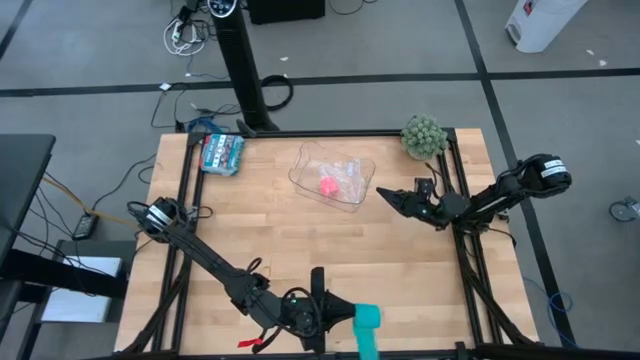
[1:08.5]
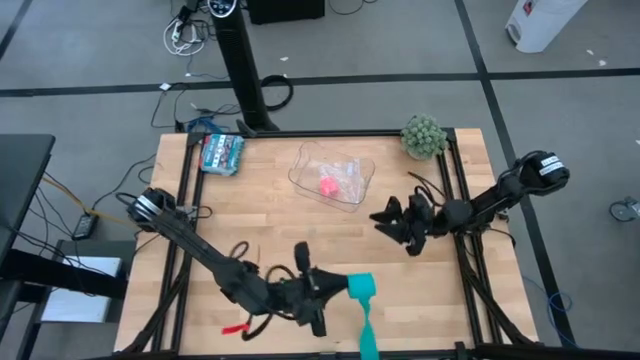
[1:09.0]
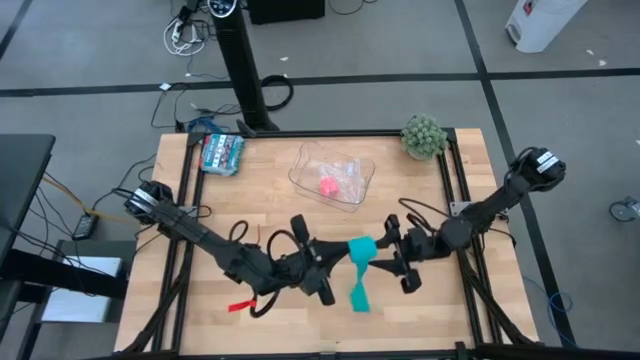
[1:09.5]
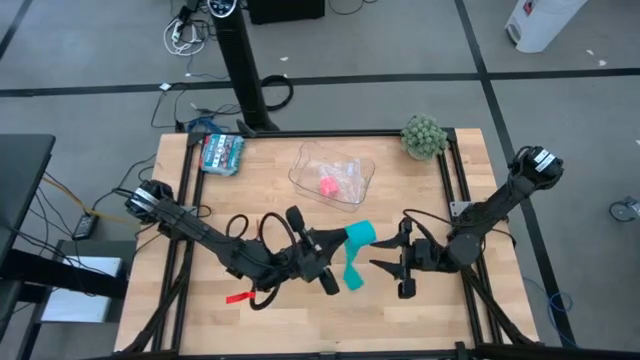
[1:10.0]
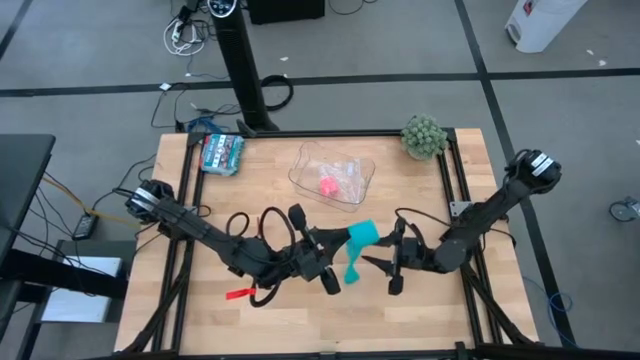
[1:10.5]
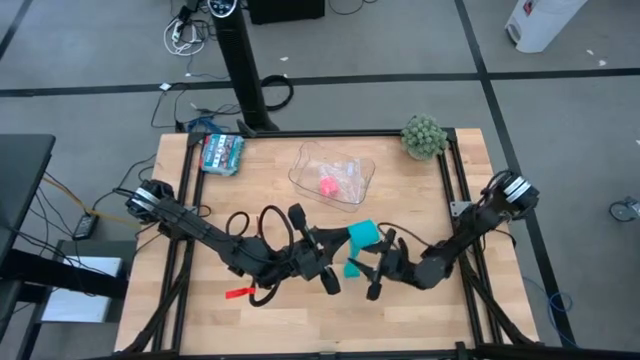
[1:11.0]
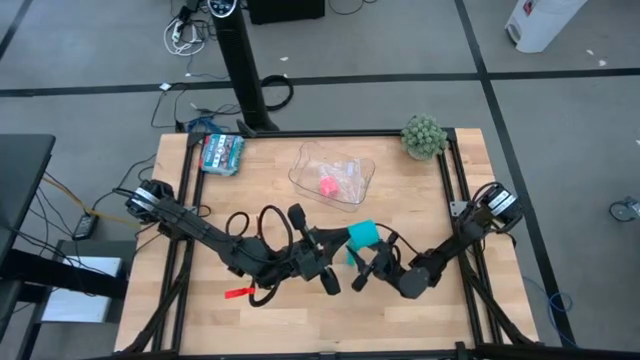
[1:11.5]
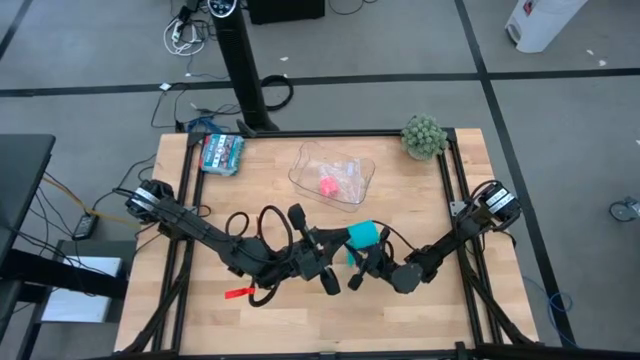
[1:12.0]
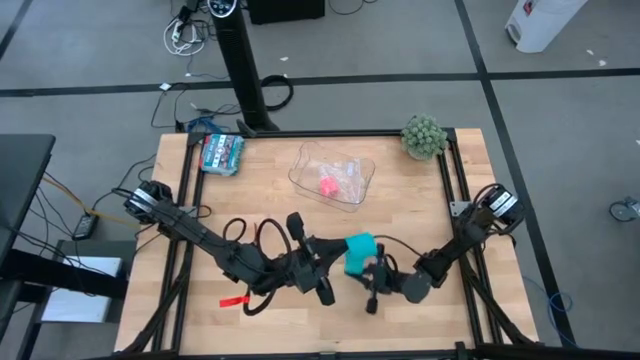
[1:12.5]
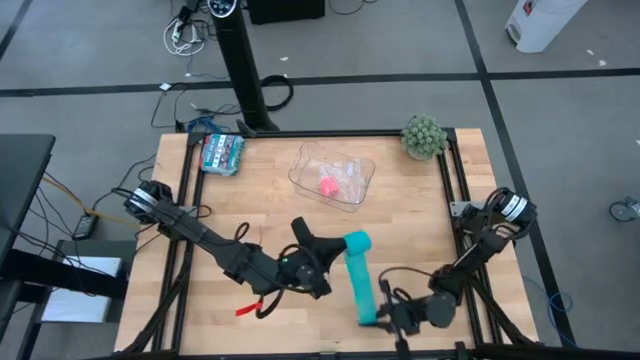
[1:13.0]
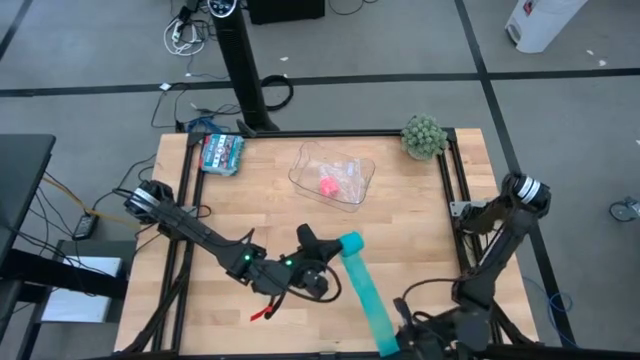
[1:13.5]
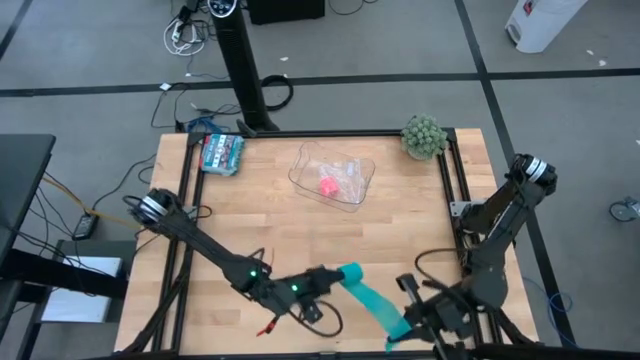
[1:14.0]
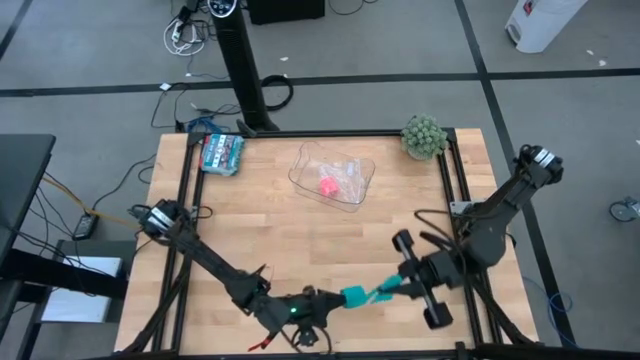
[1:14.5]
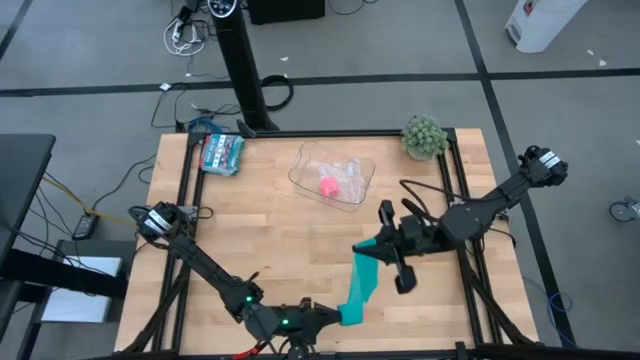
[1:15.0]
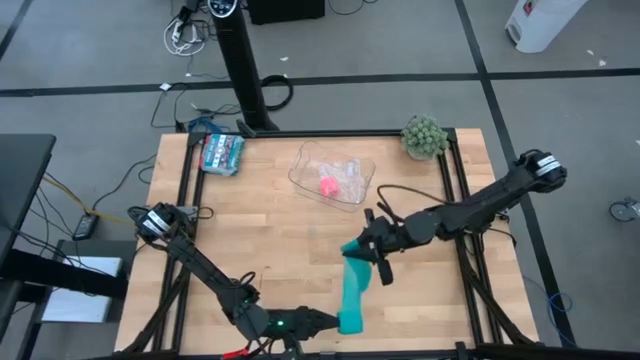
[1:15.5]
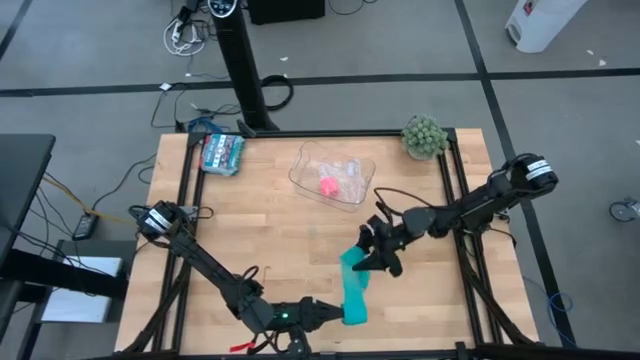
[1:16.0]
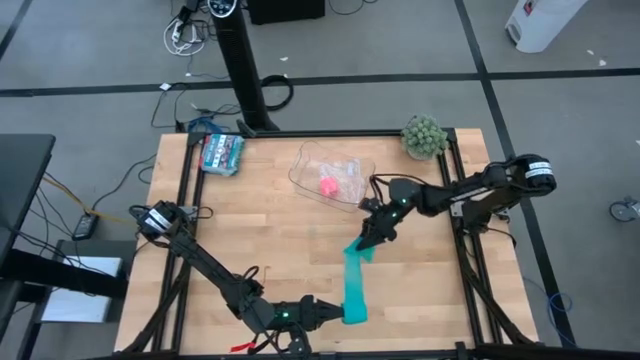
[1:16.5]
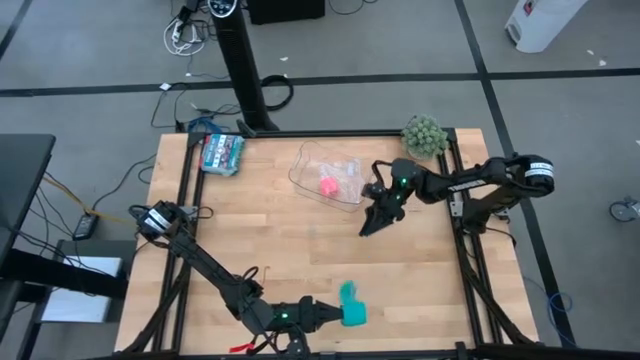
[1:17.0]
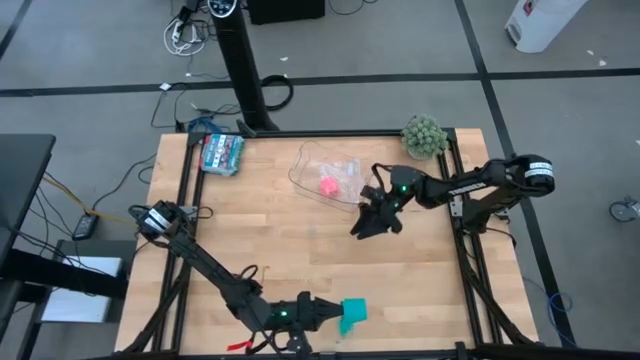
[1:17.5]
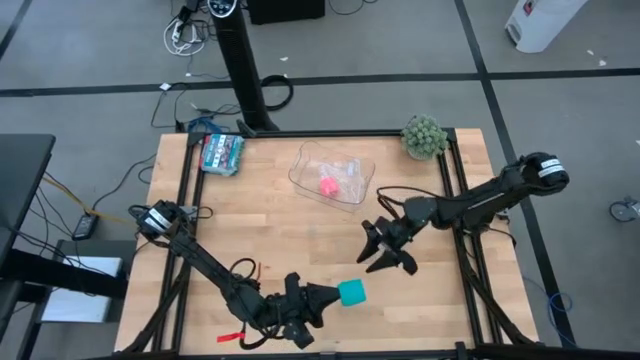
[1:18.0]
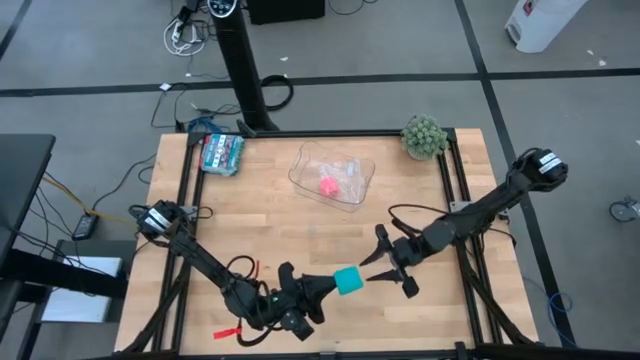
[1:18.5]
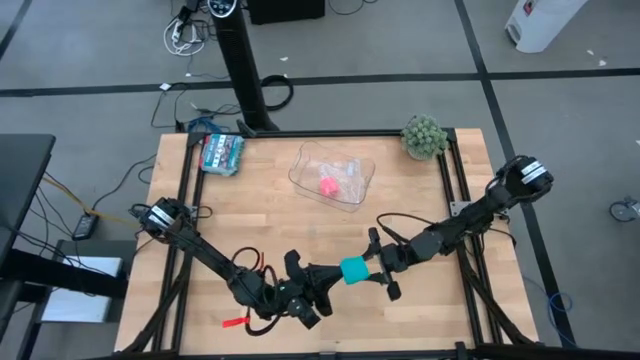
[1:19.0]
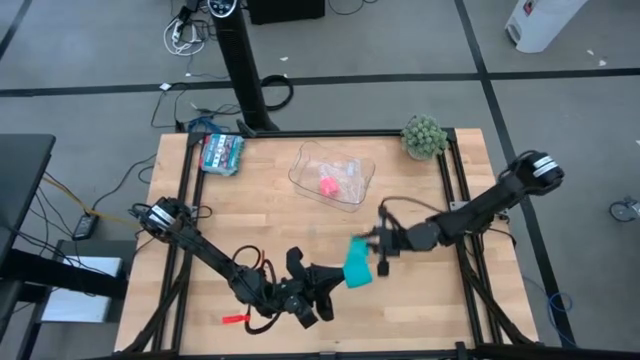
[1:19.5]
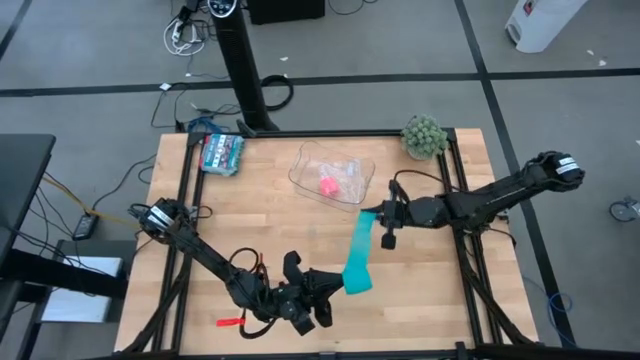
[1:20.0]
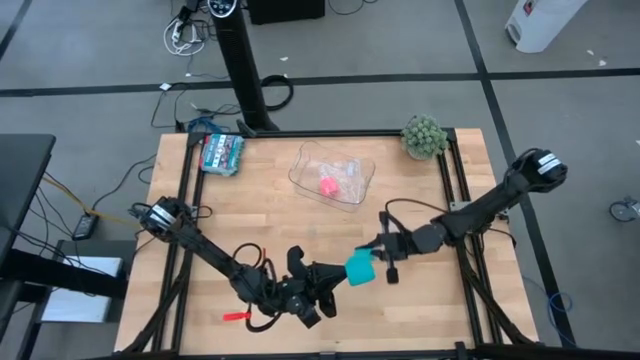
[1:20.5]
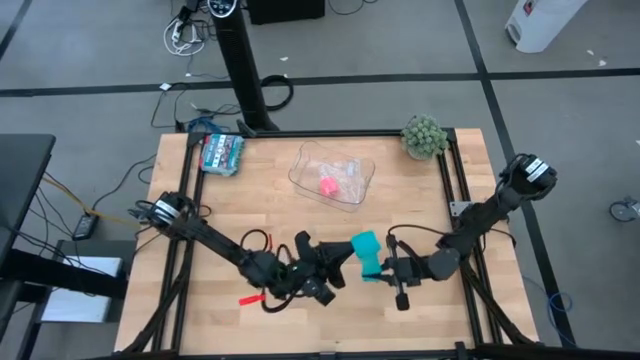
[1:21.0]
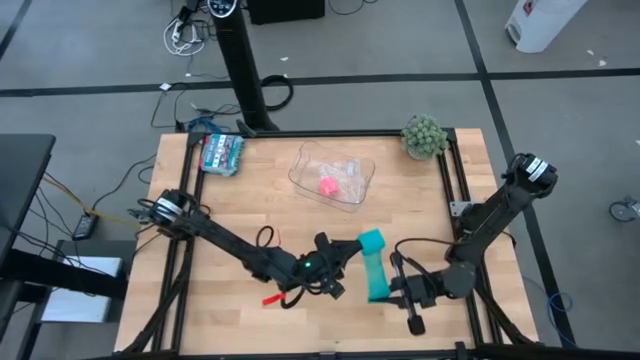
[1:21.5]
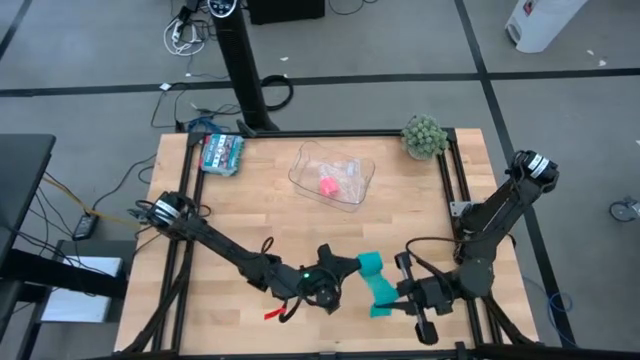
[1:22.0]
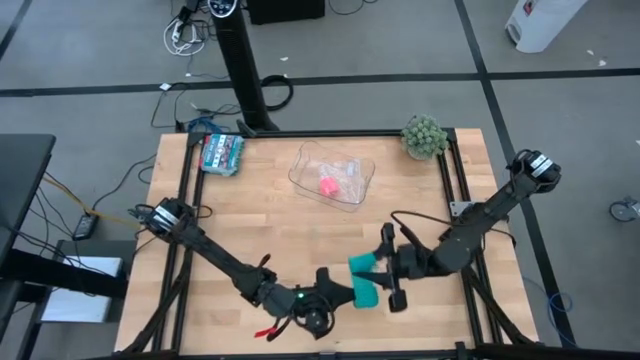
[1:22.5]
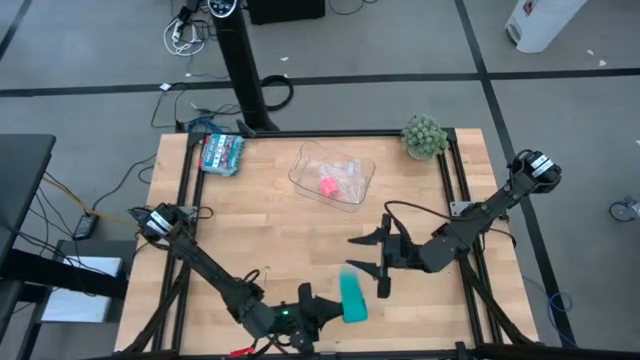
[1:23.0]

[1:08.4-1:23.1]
Task: Roll bandage
Roll the blue bandage

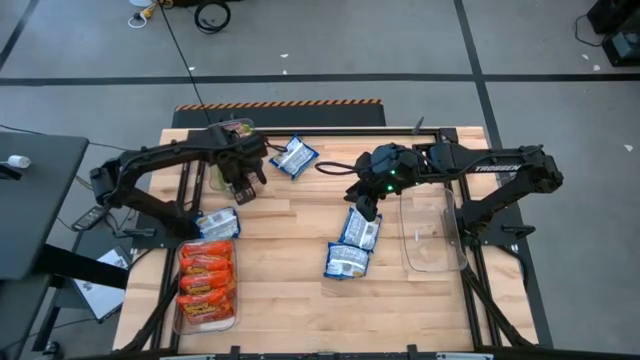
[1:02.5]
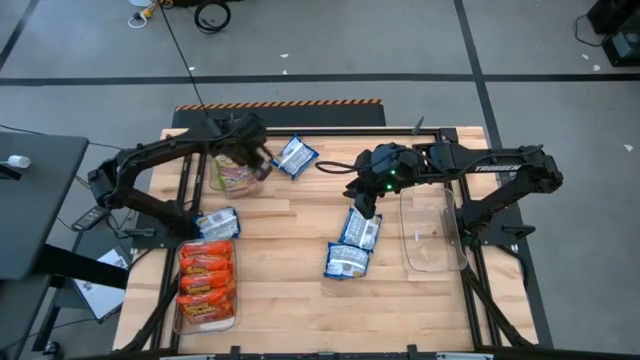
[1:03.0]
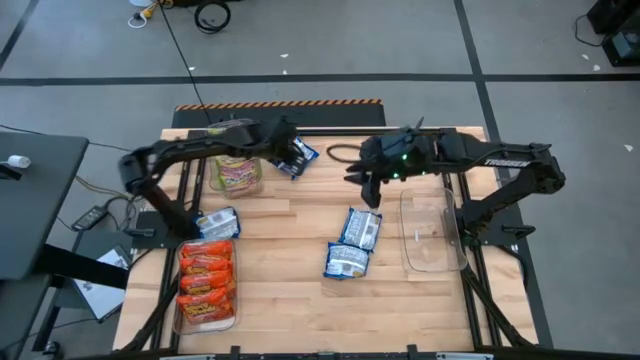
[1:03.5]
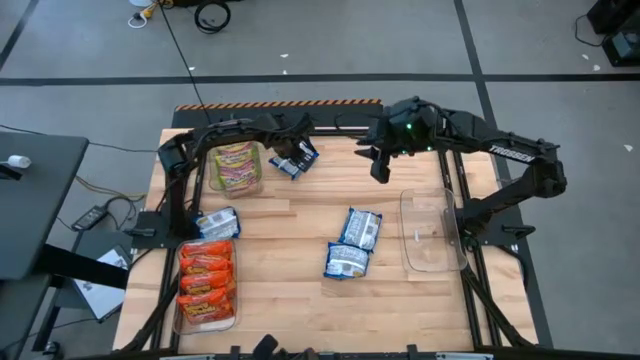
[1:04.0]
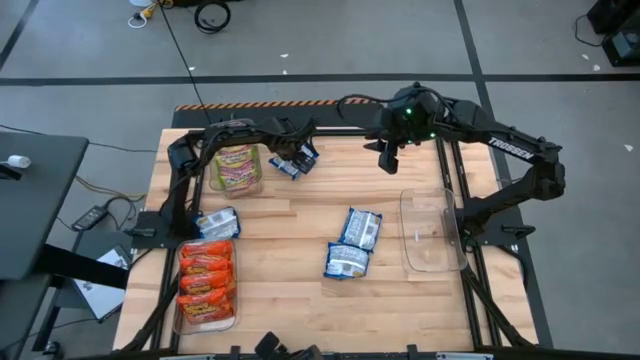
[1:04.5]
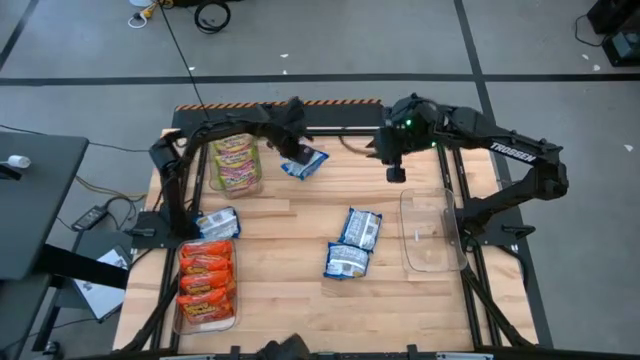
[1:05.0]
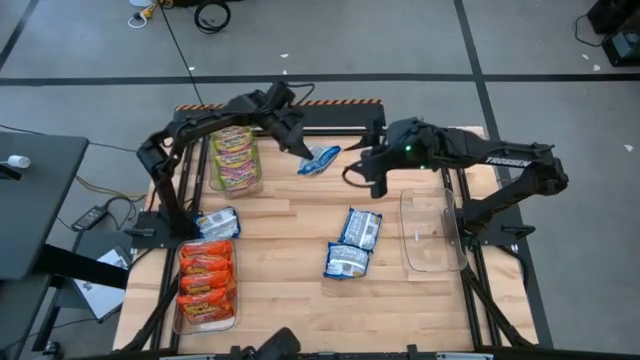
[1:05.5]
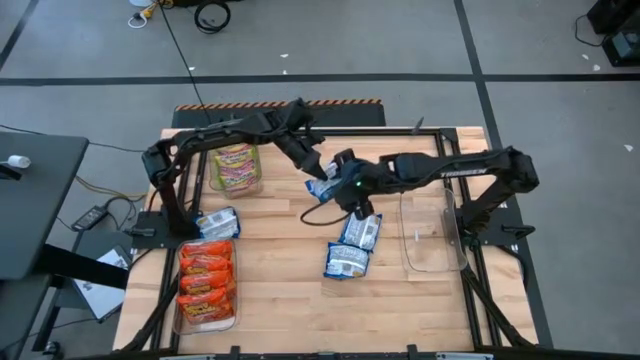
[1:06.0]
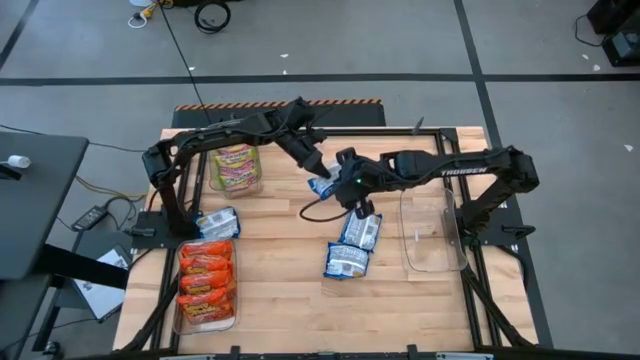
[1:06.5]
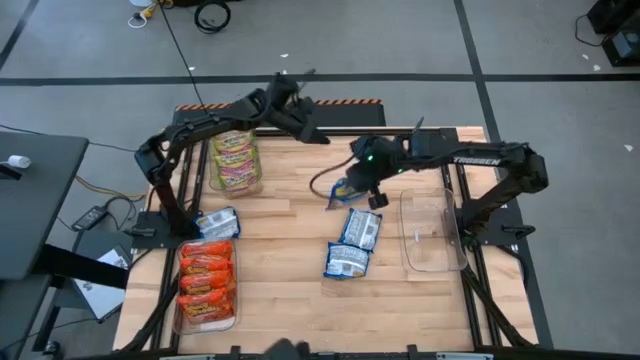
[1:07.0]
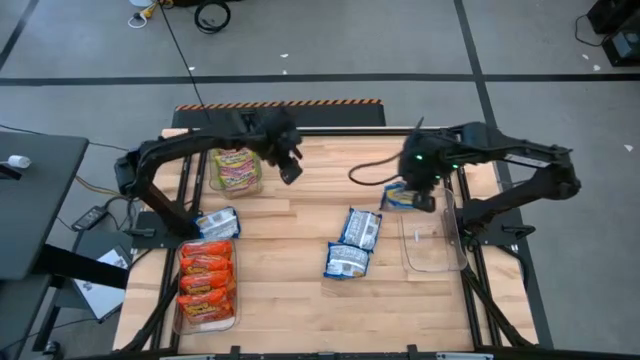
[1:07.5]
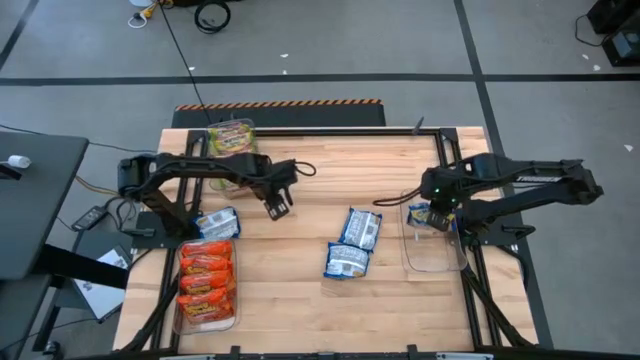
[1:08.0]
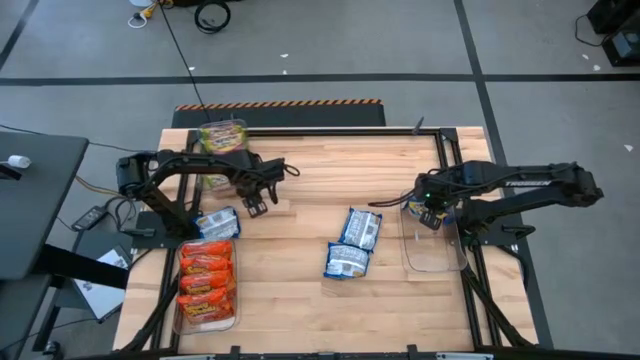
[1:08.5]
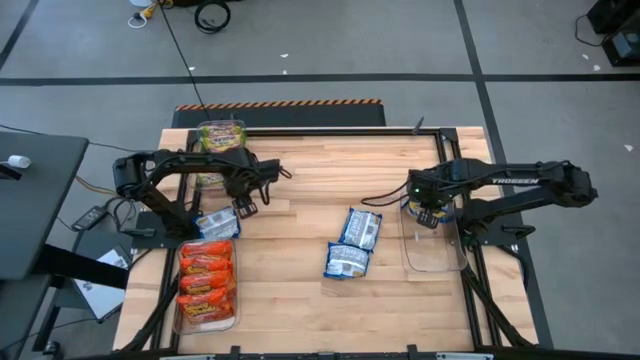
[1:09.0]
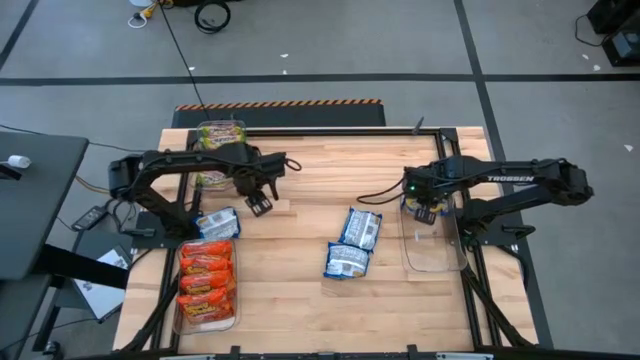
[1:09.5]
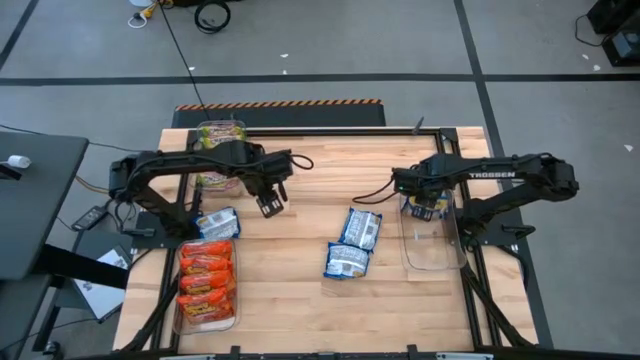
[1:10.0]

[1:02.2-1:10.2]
Task: Sort Maruchan noodles
Put the blue noodle pack into the right transparent bin
